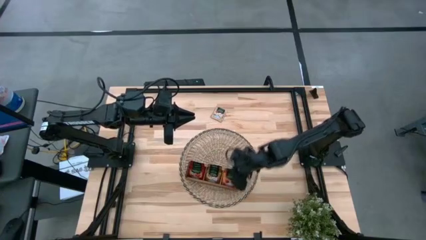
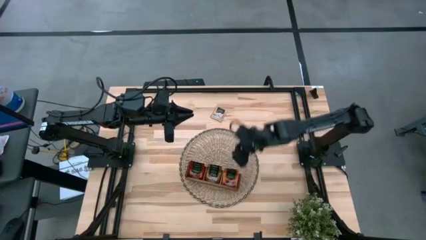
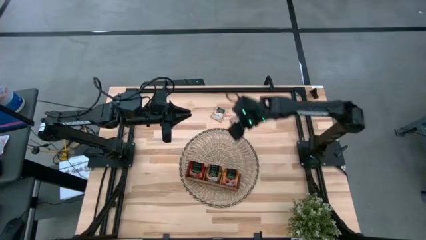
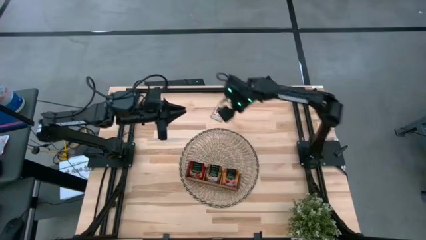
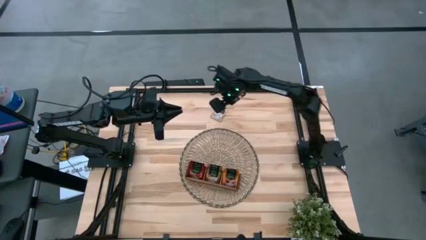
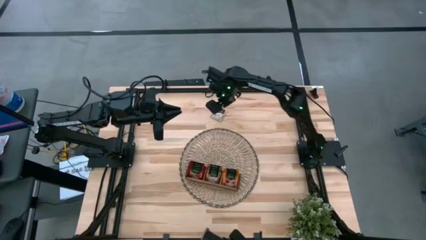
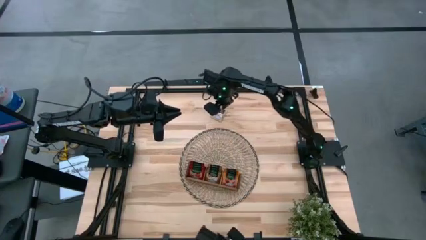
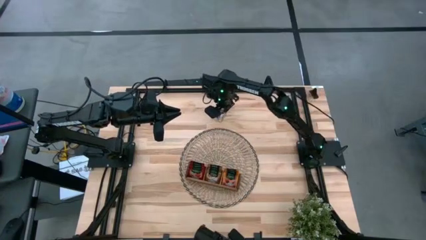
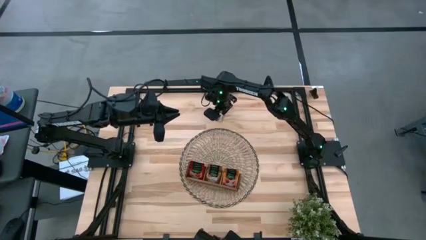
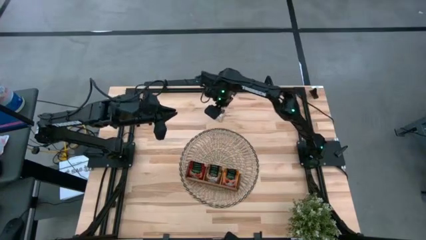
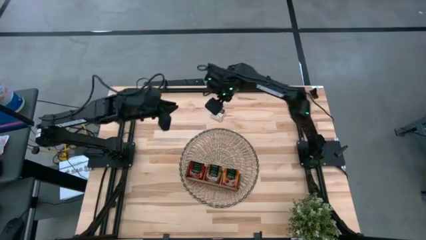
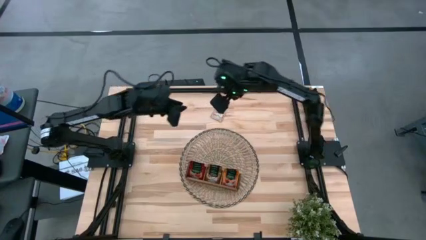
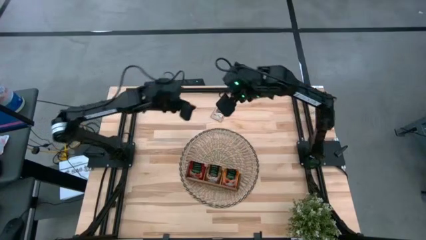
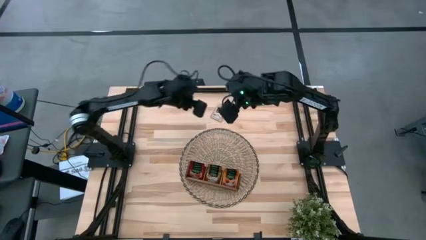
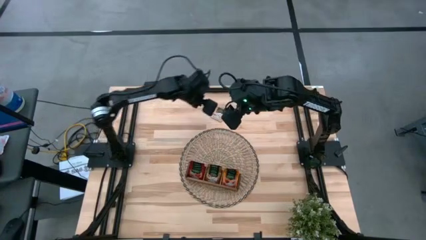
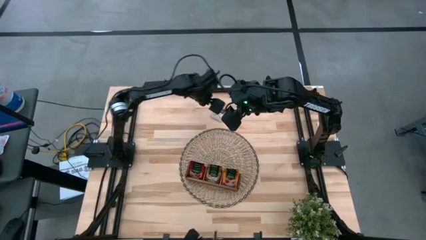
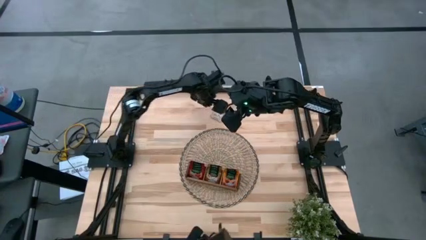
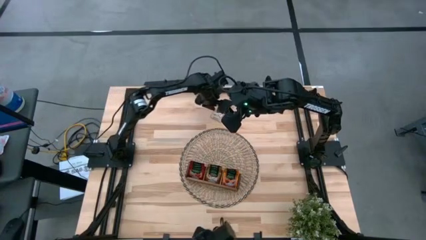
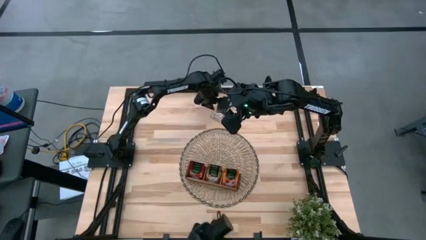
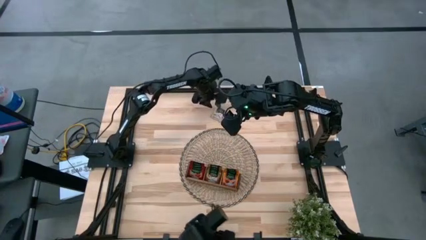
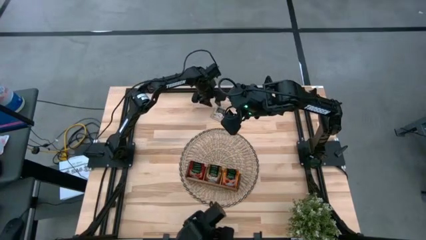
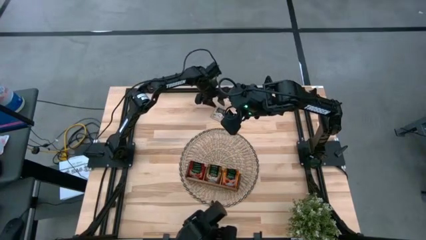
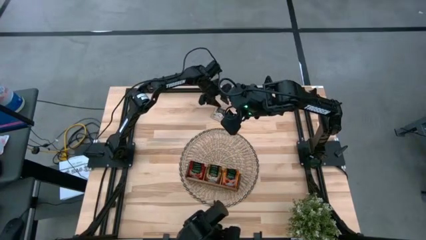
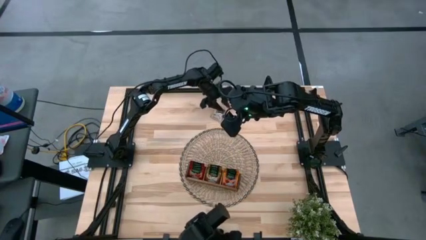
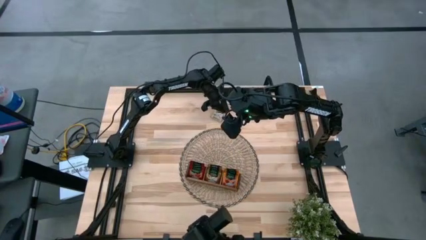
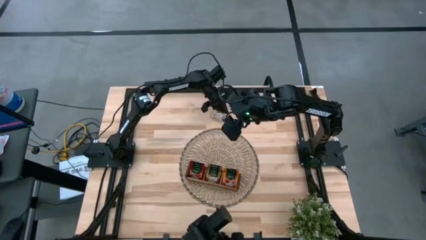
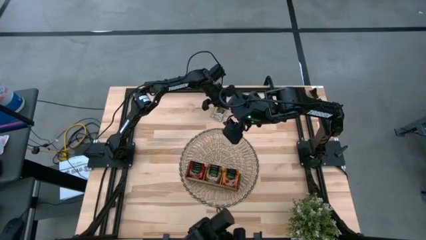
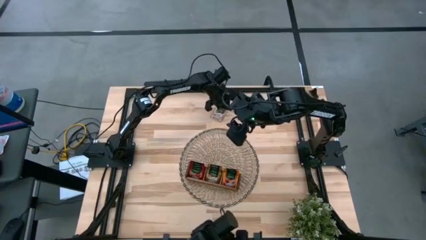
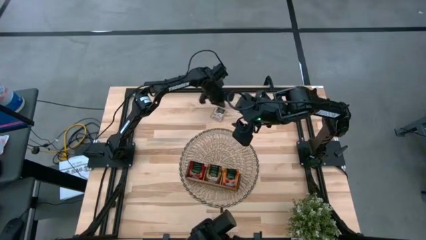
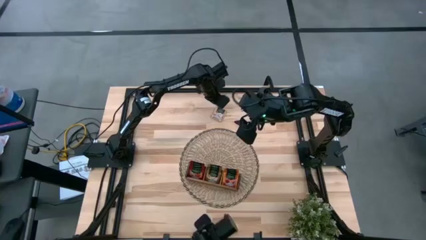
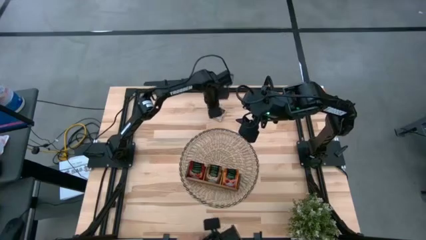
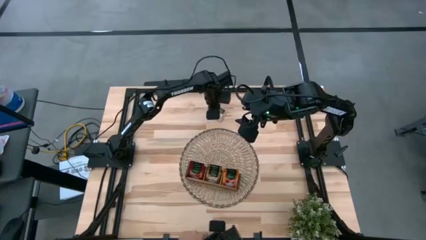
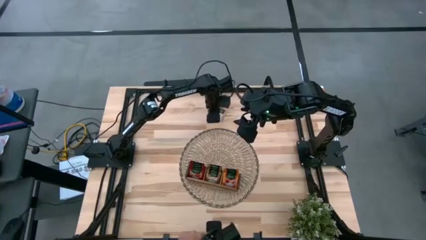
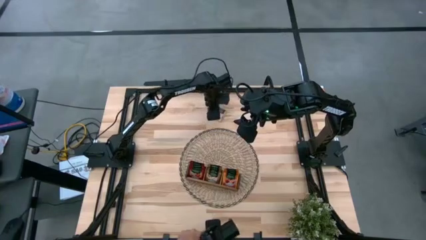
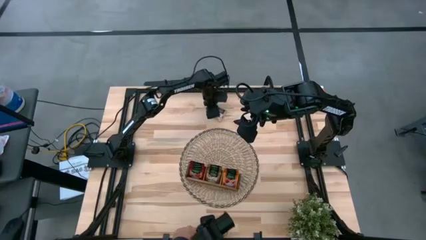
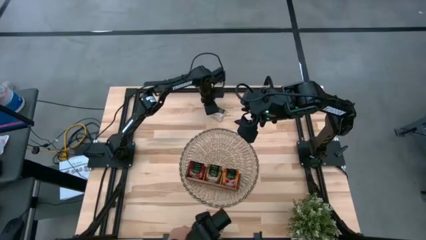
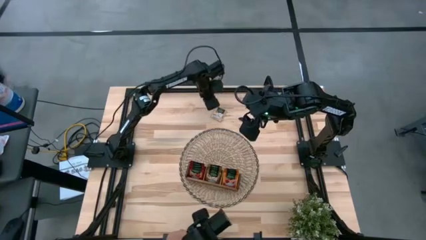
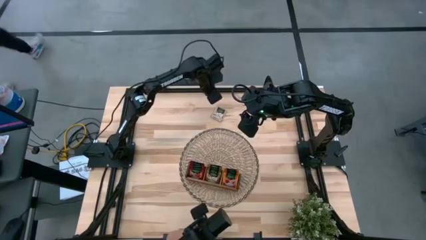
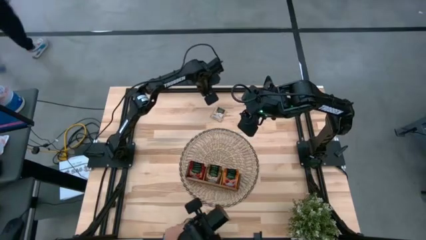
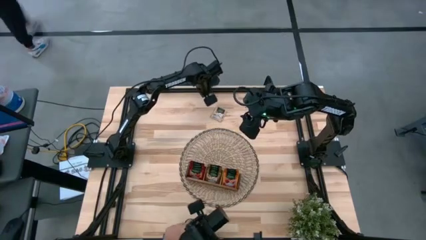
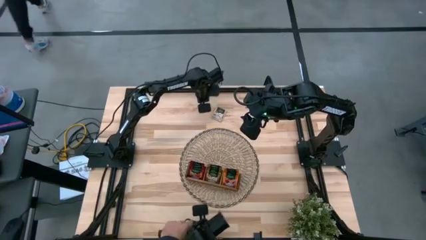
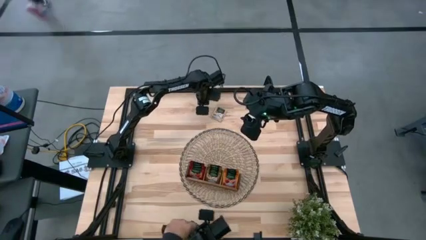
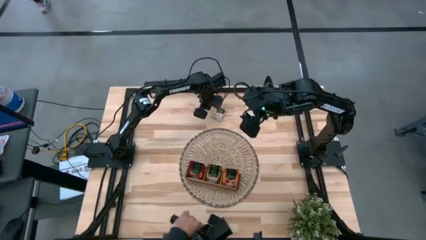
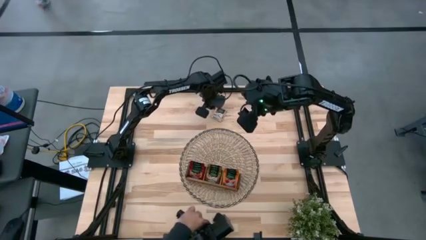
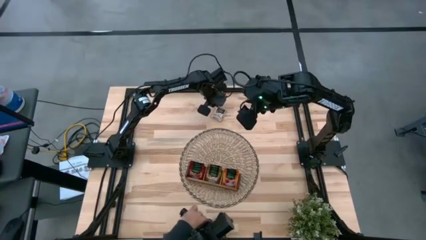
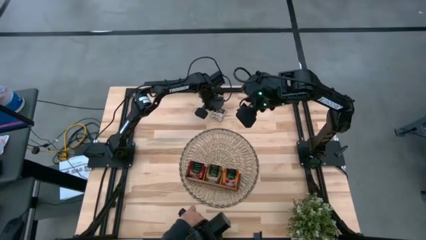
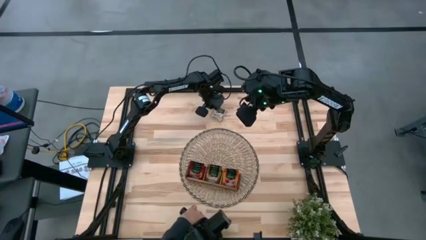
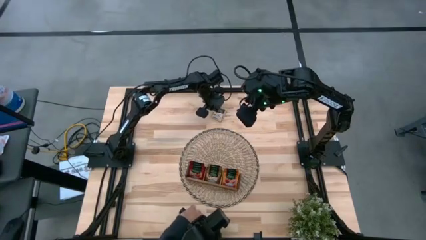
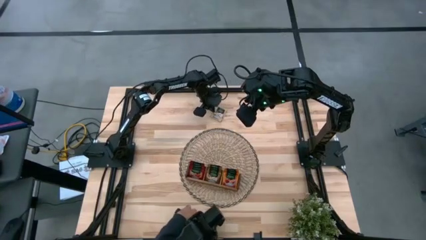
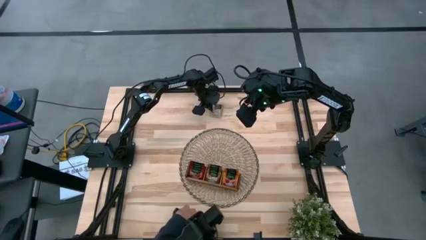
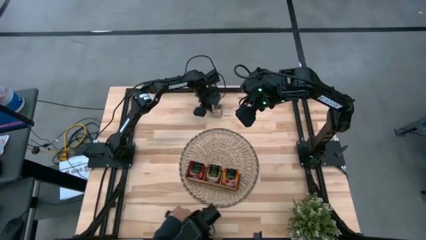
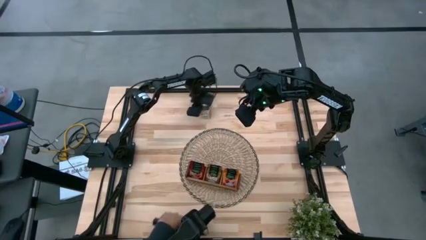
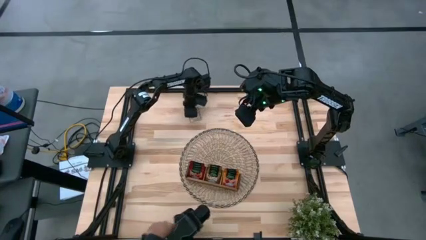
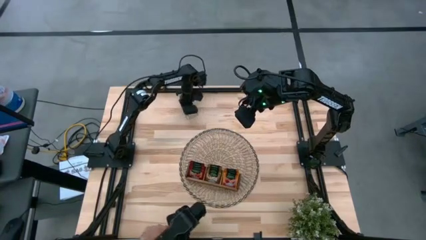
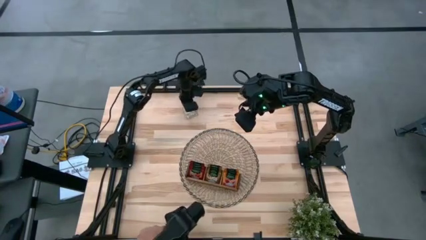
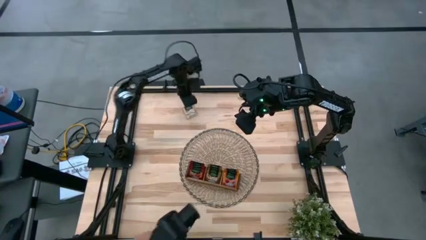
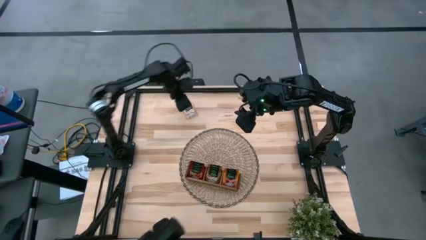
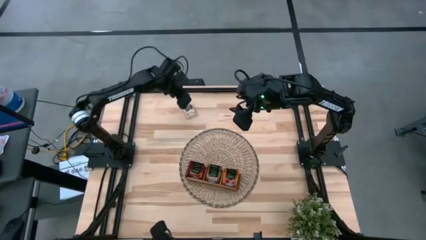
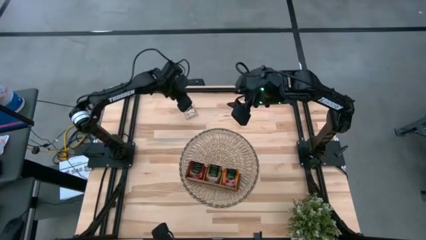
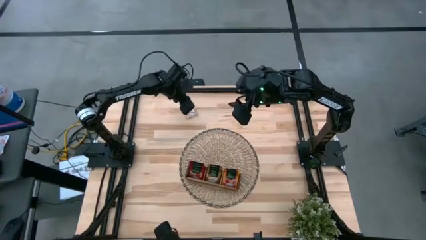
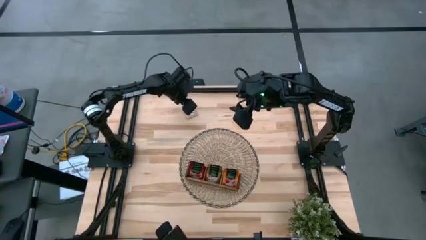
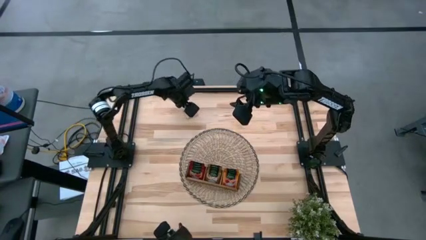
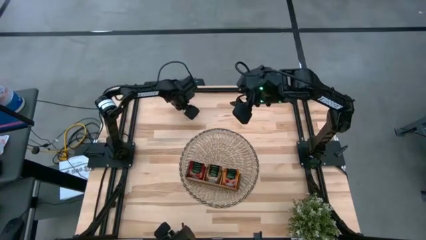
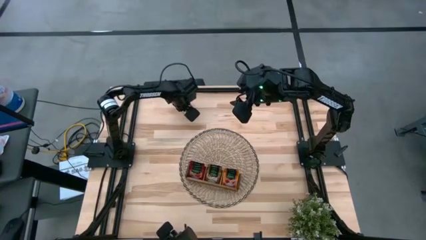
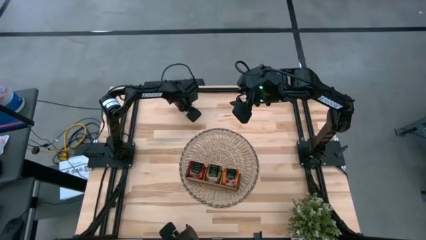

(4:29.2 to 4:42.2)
Task: Pick & Place Tea
Put the brown tea bag into the middle section of the wooden organizer

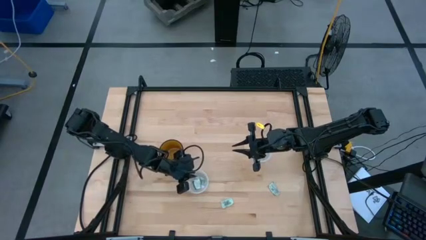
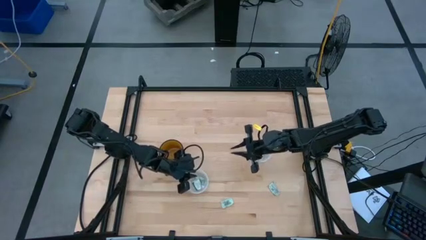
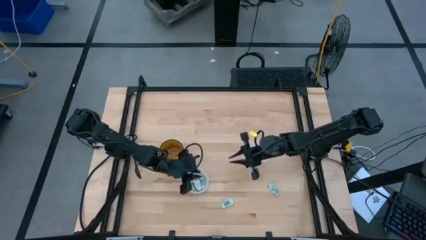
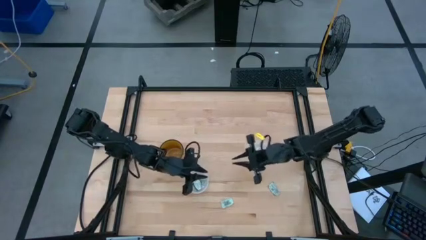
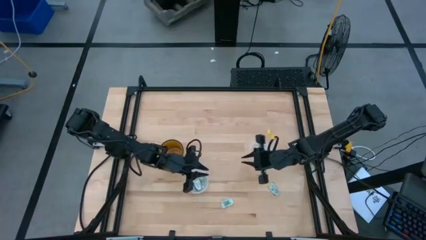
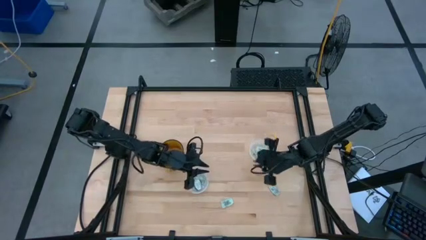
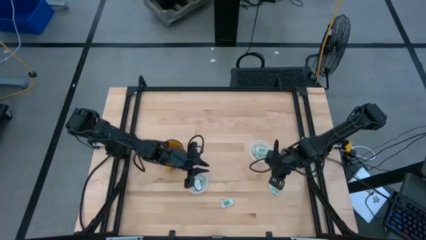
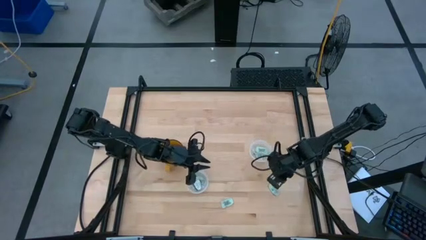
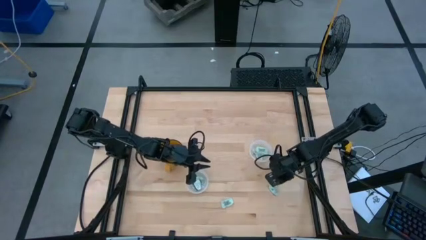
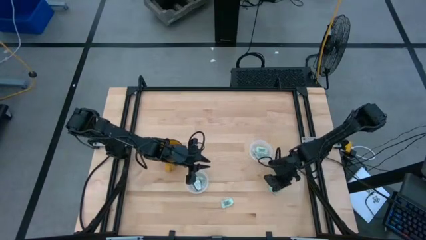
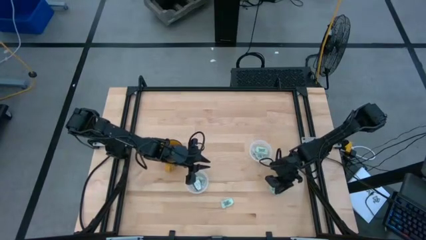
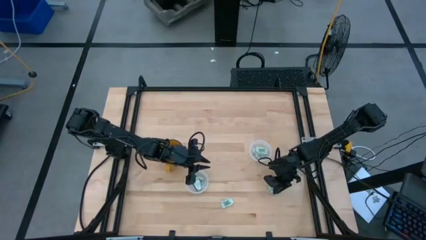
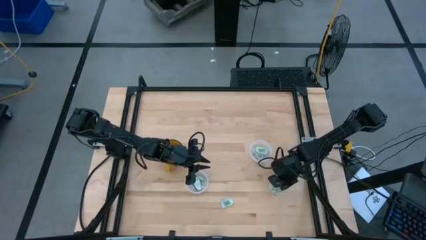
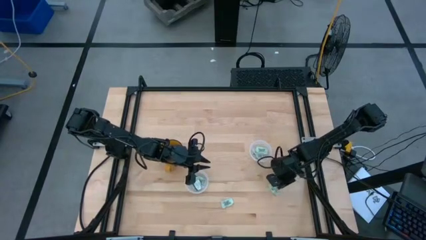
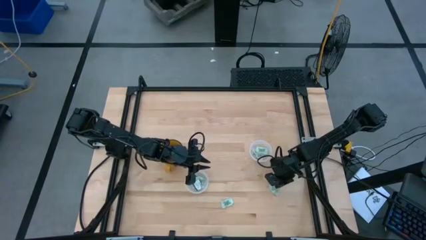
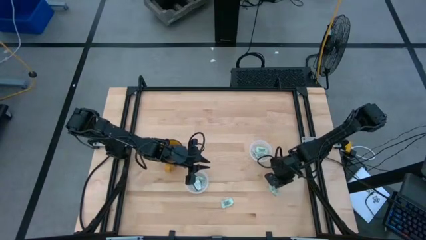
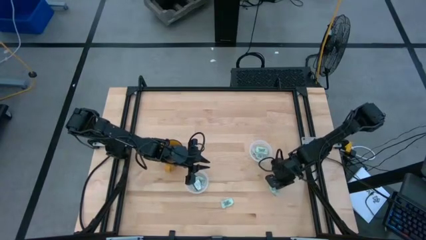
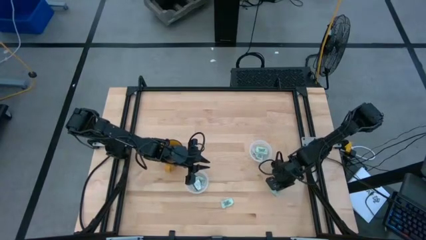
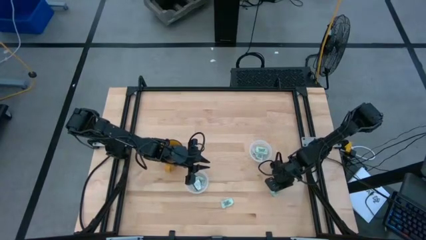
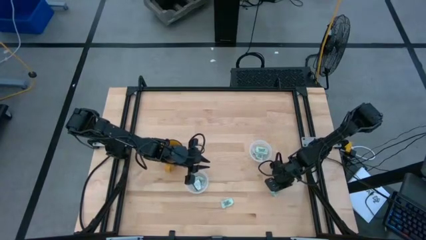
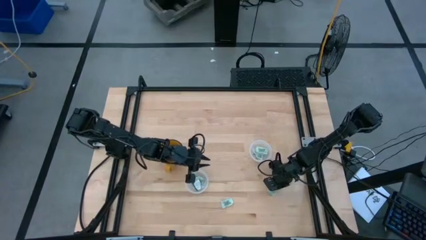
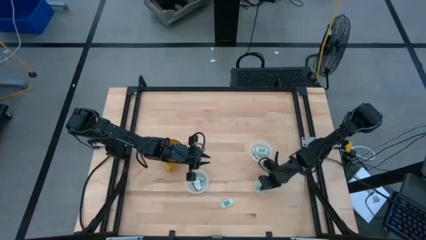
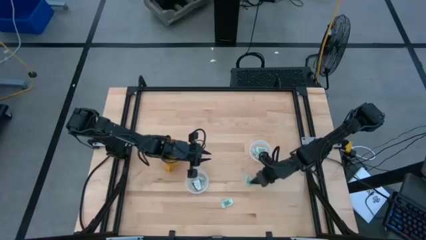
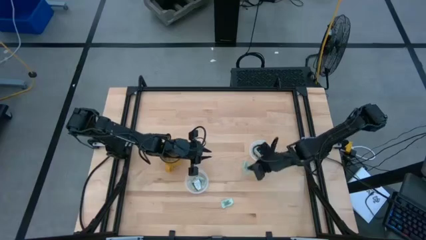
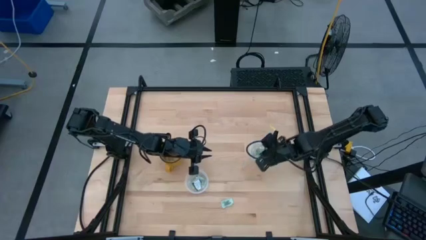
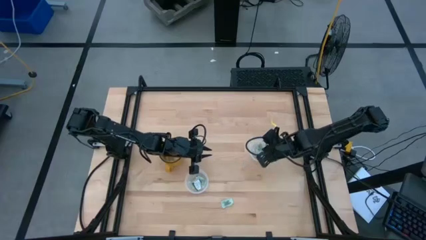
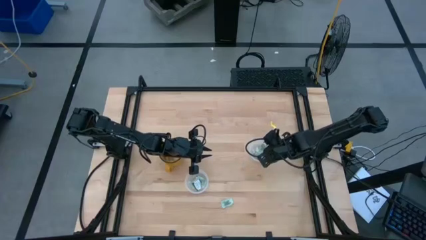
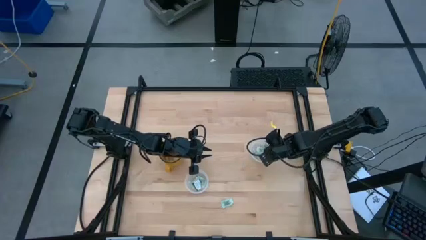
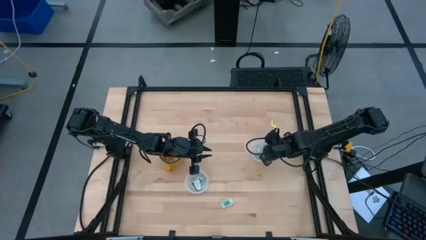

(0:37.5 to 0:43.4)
Task: Pick and place Stevia / Truvia into bins
Put the white stevia packet into the right transparent container
